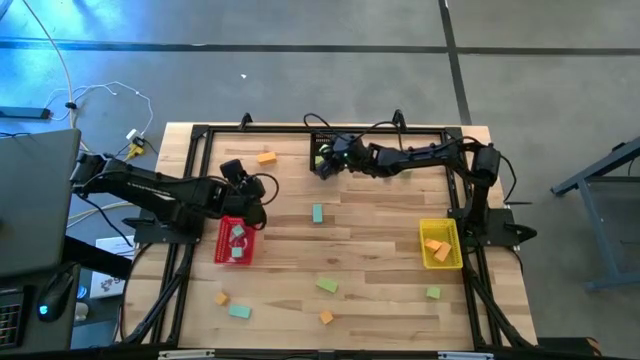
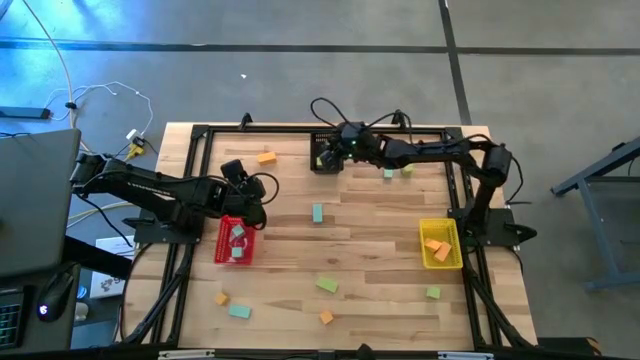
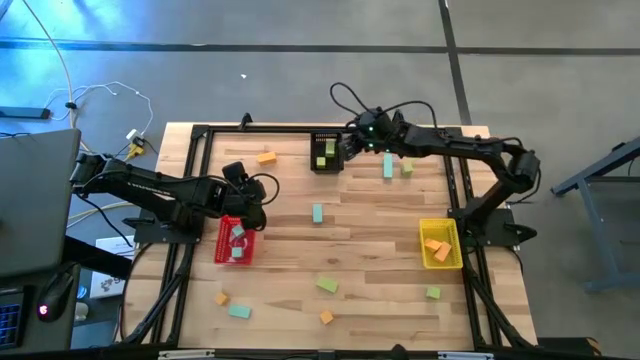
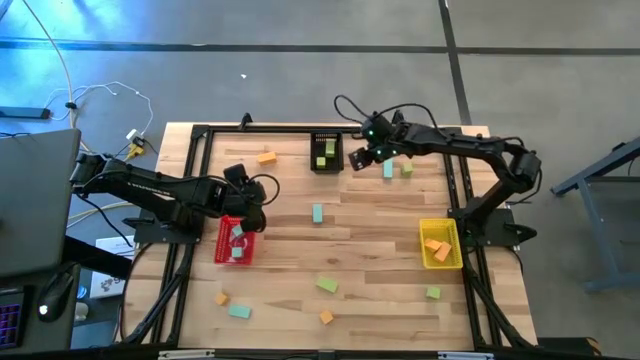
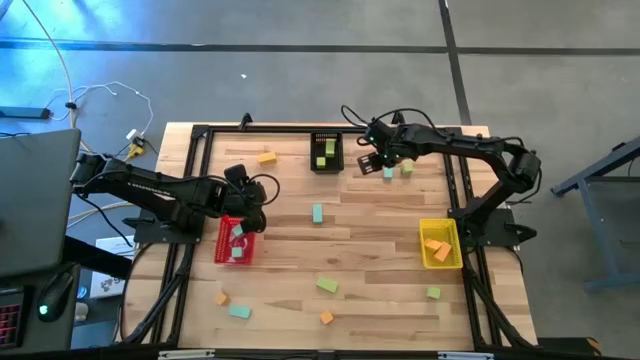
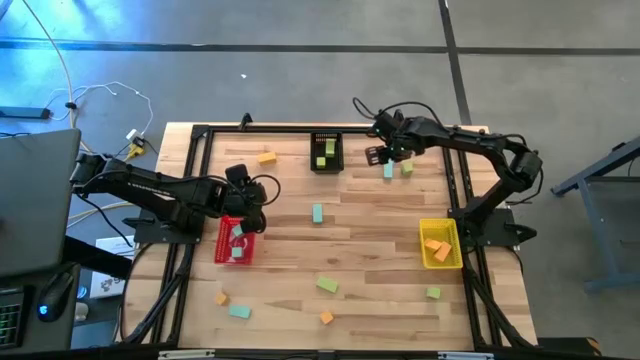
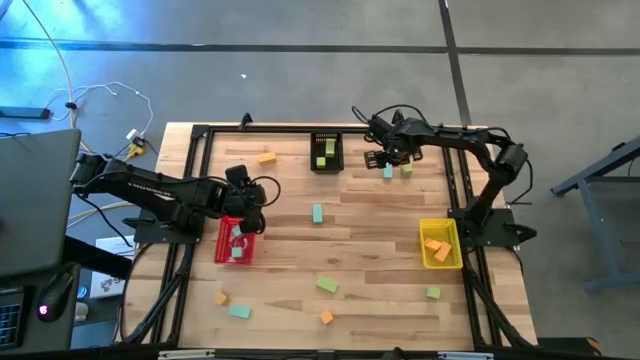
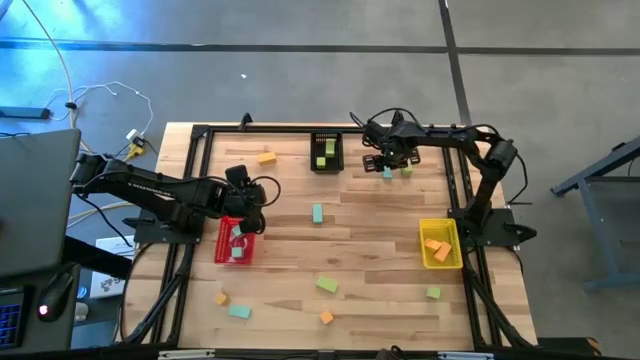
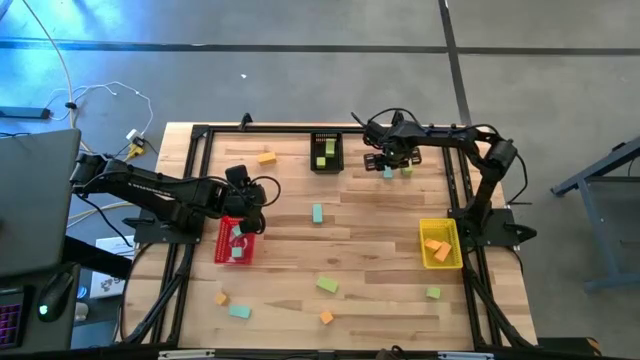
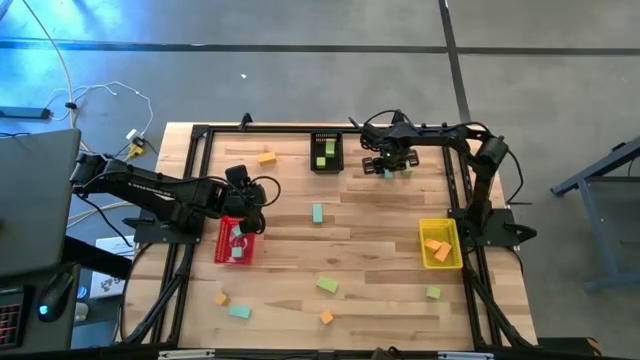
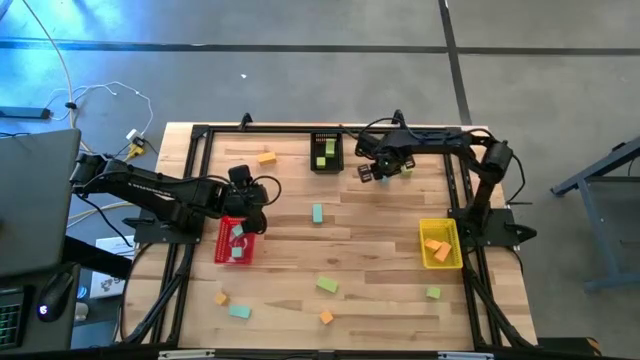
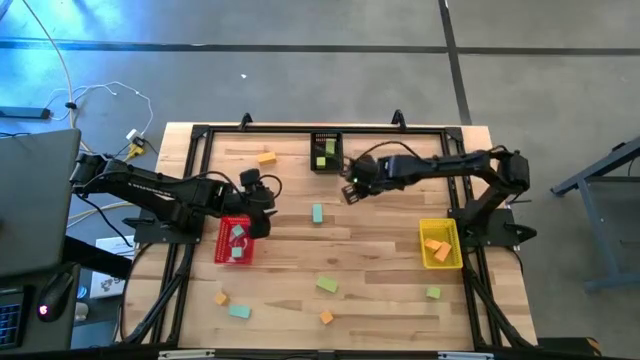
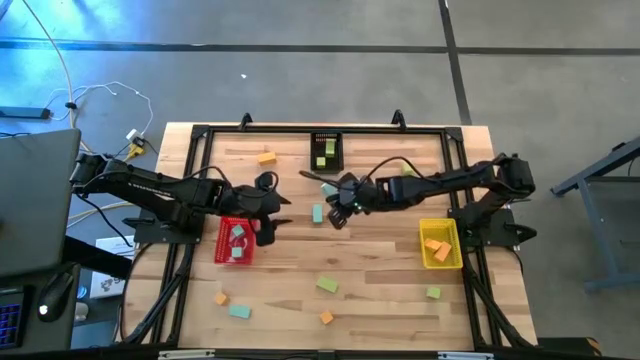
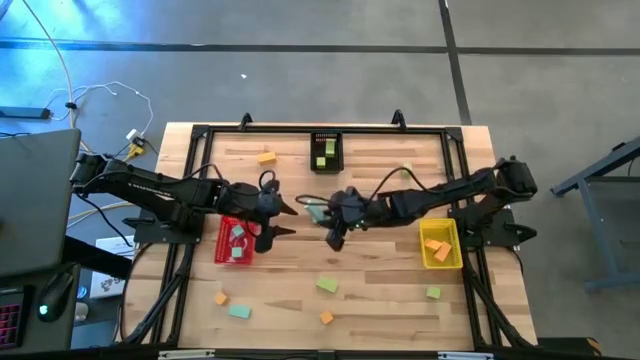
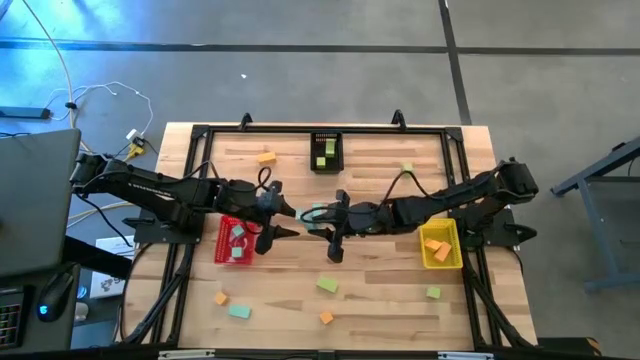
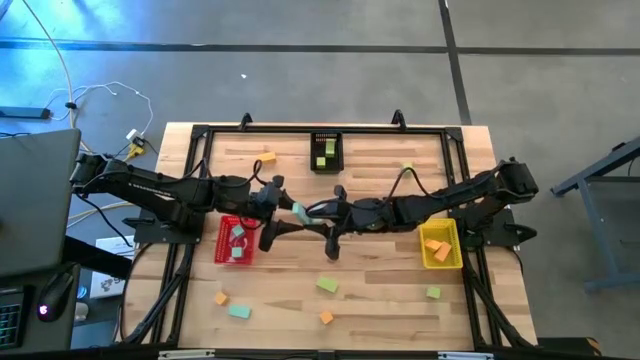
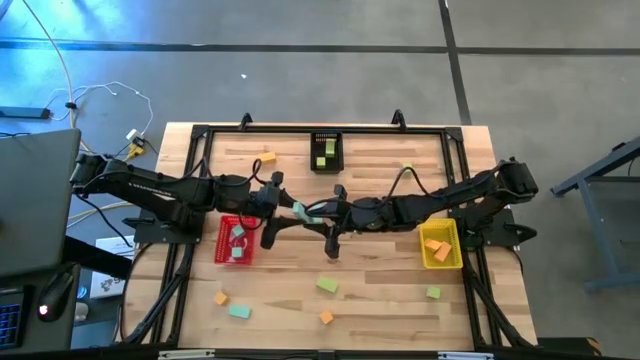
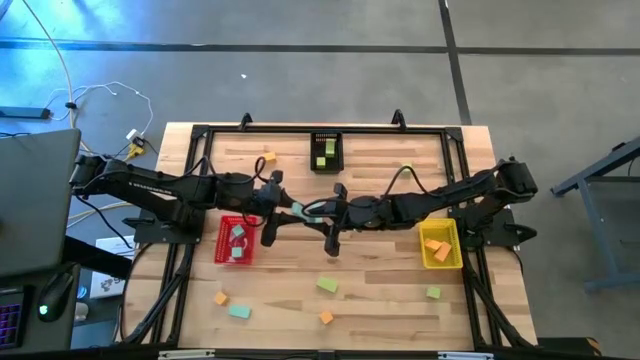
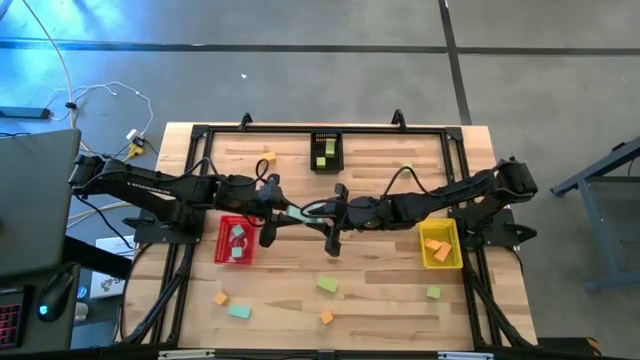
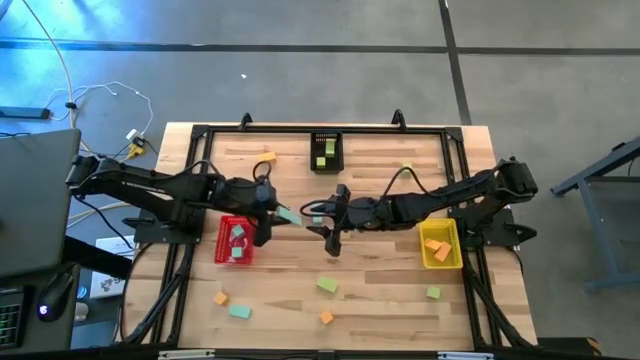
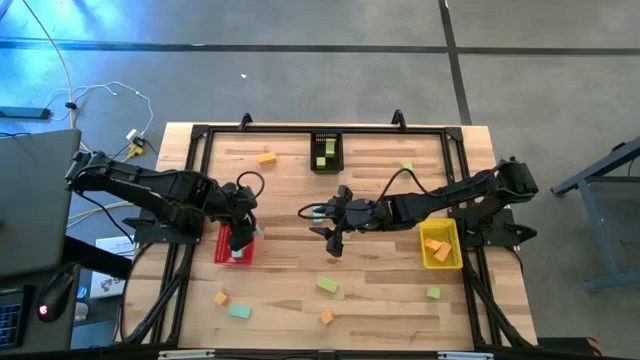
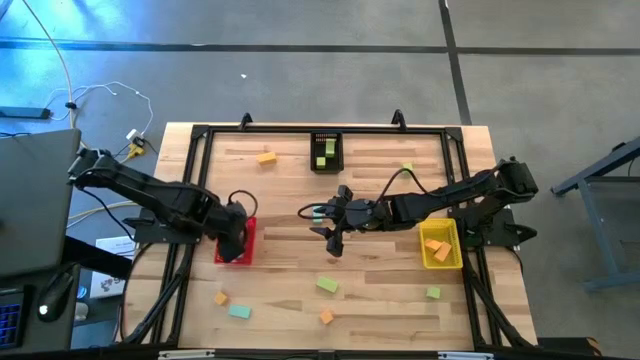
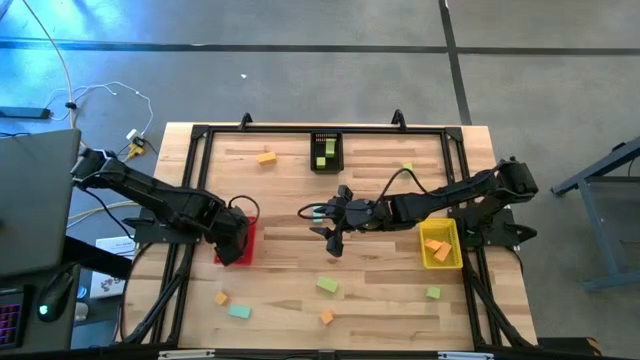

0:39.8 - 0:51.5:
Task: Sort & place blocks by color
Put the blue block into the red bin

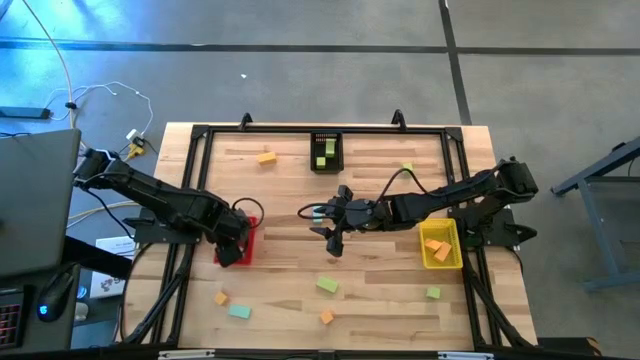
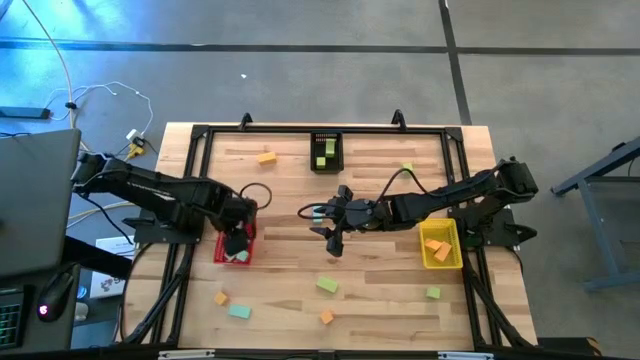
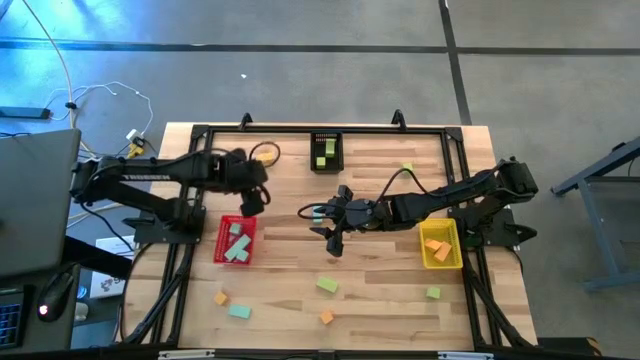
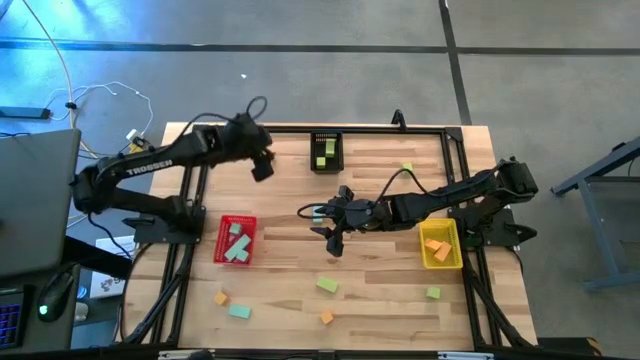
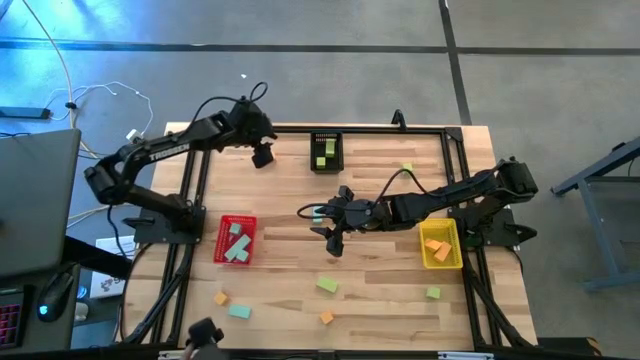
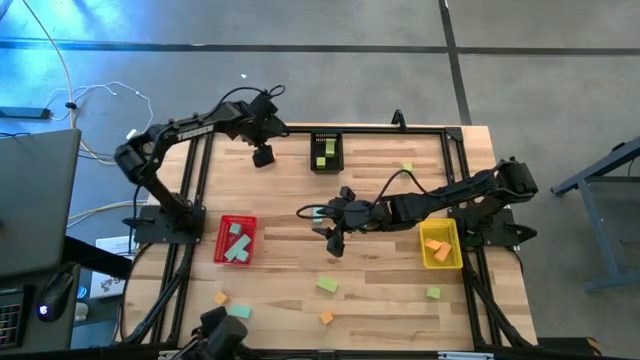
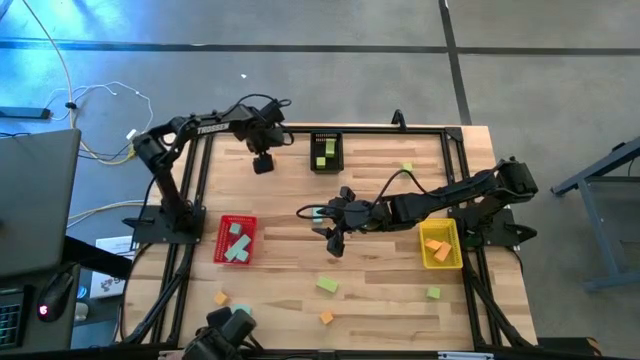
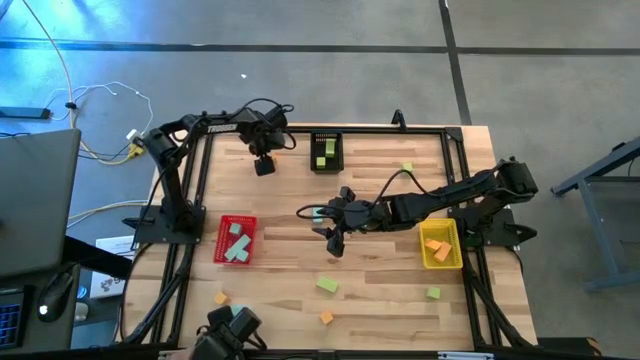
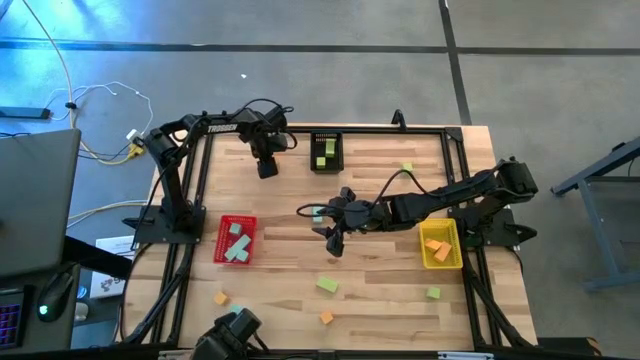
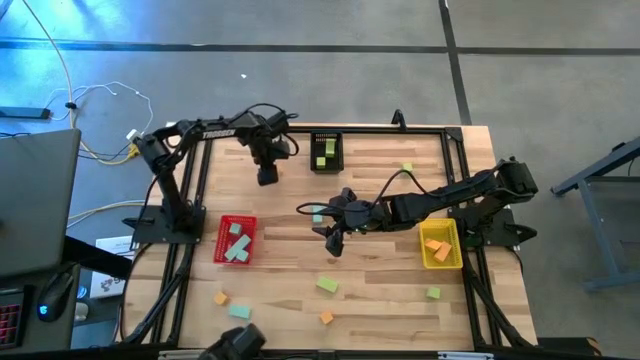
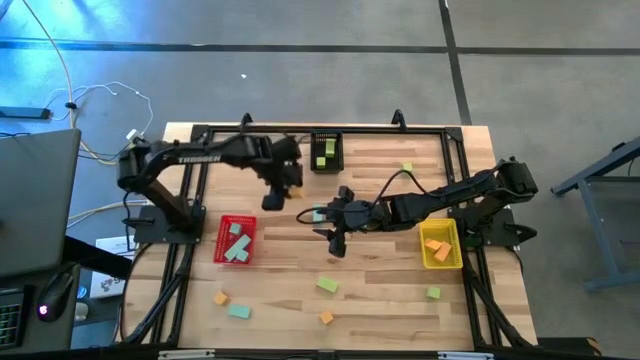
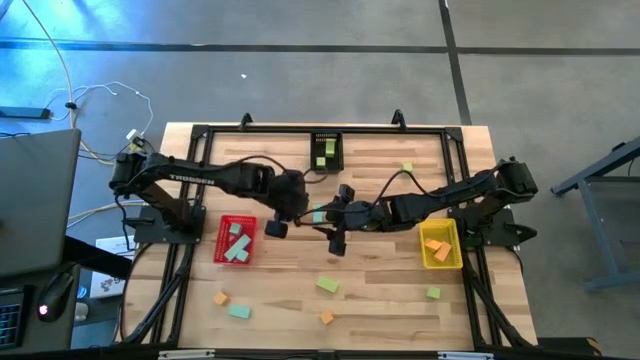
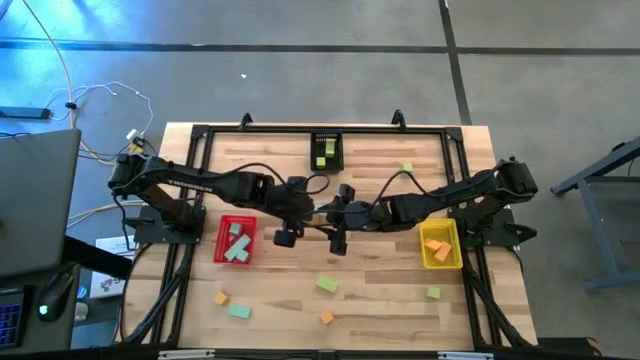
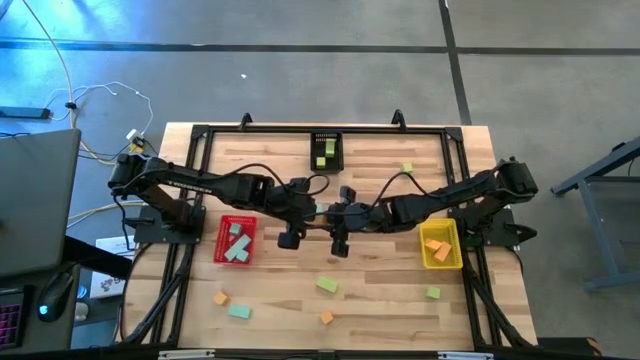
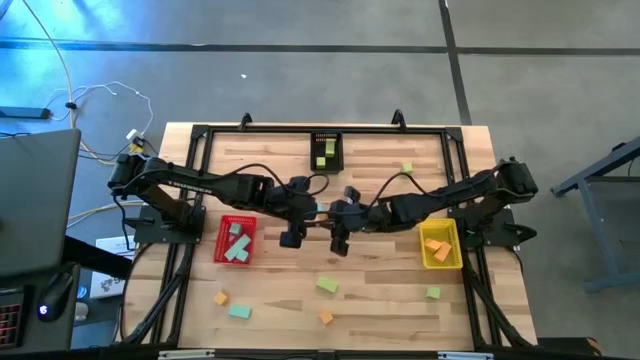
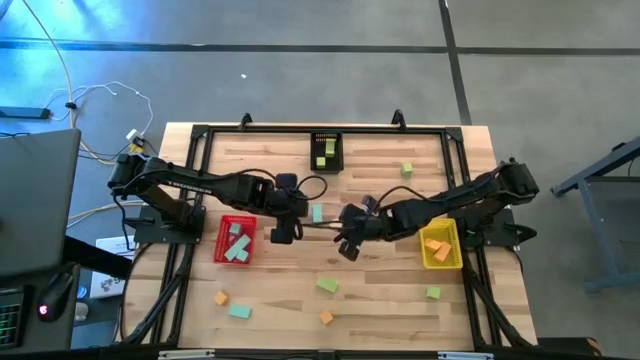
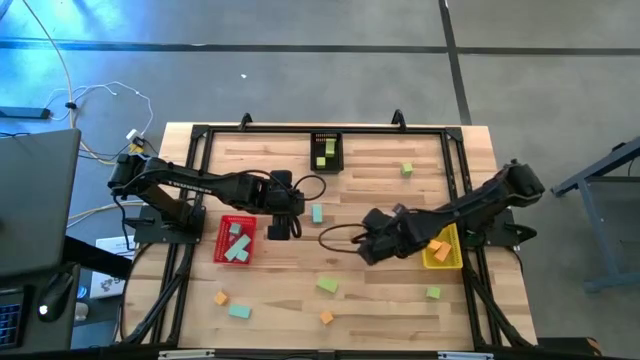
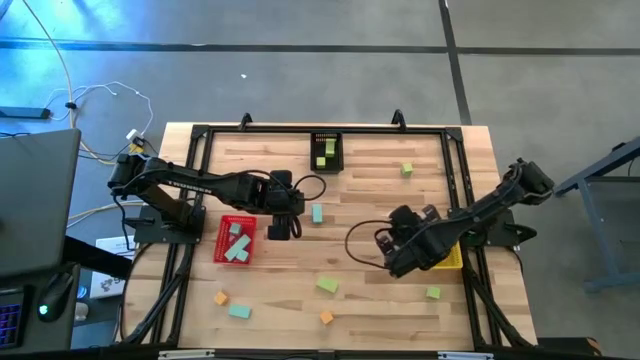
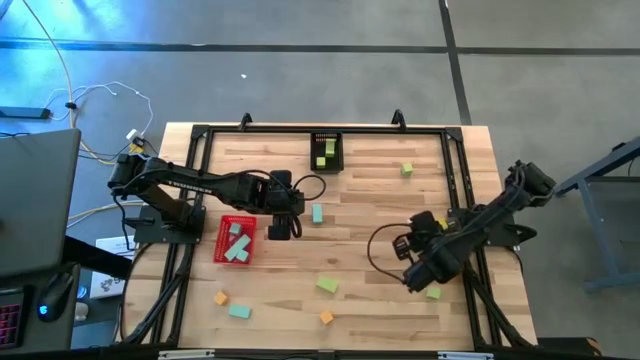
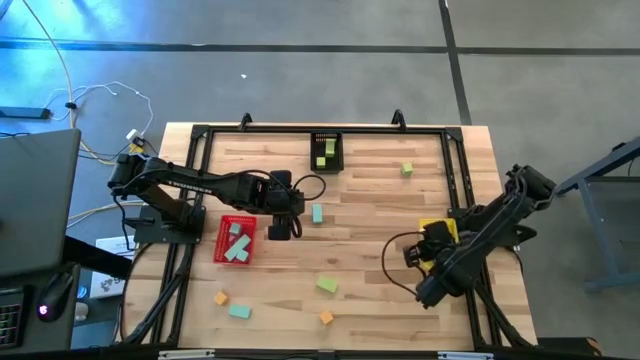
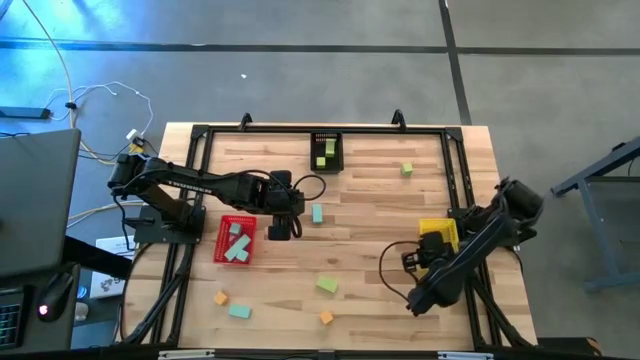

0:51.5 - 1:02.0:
Put the yellow block into the yellow bin
